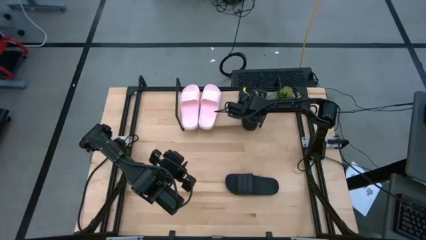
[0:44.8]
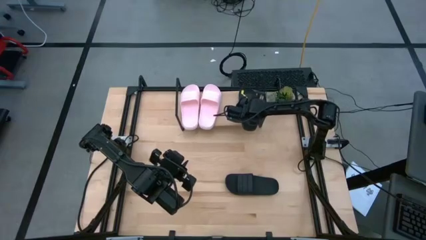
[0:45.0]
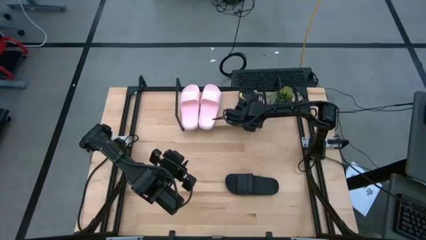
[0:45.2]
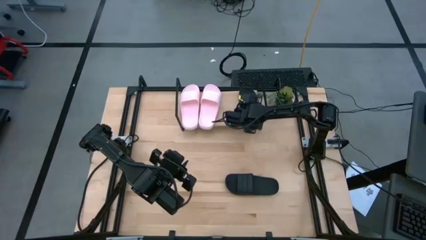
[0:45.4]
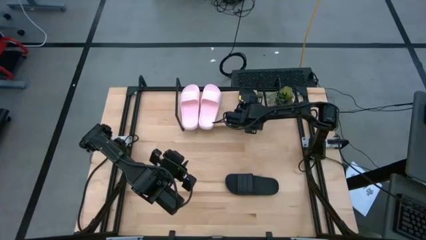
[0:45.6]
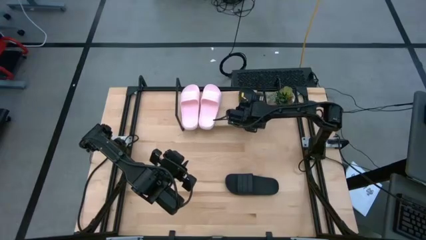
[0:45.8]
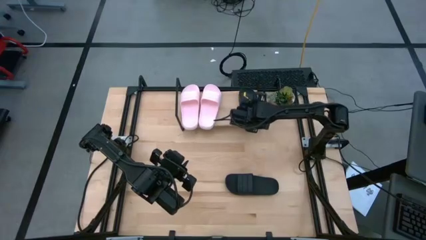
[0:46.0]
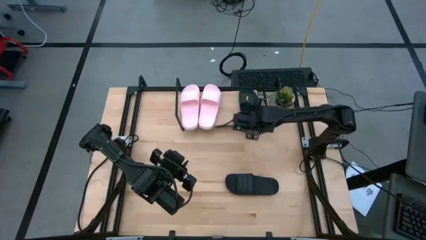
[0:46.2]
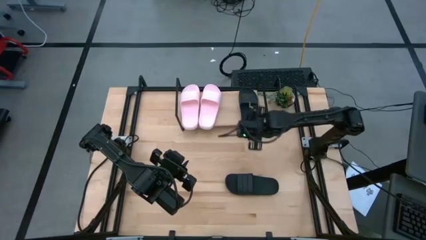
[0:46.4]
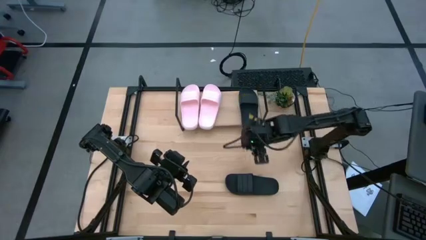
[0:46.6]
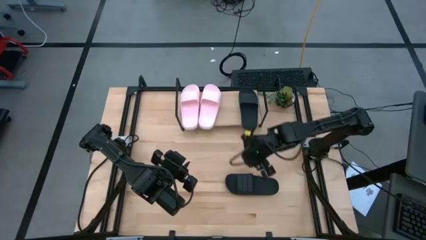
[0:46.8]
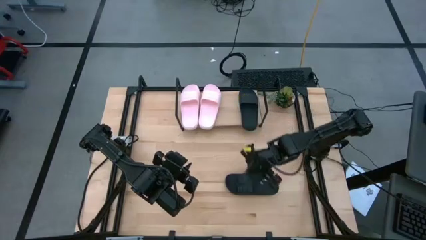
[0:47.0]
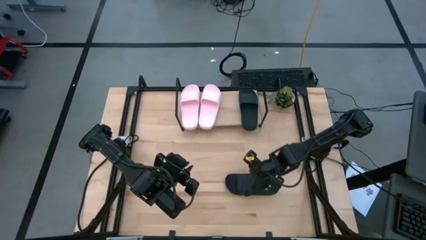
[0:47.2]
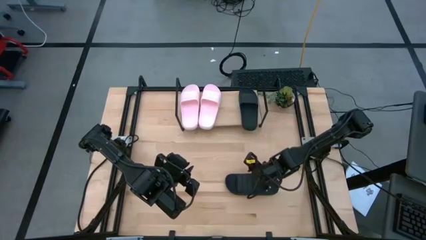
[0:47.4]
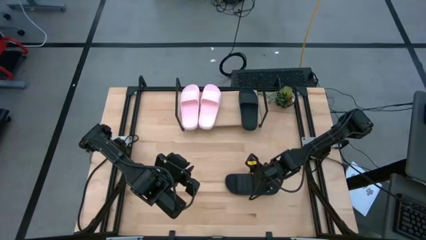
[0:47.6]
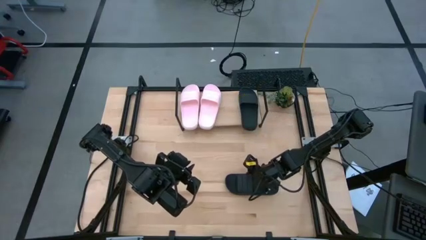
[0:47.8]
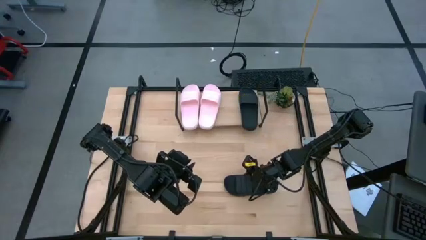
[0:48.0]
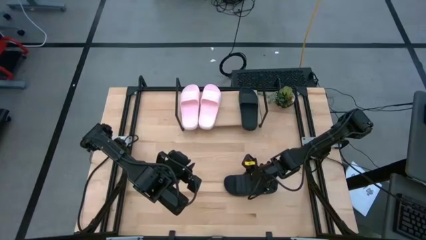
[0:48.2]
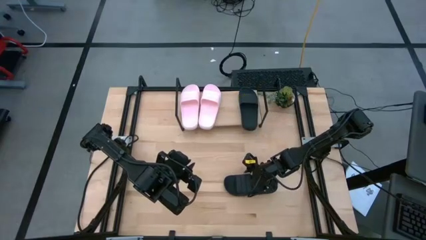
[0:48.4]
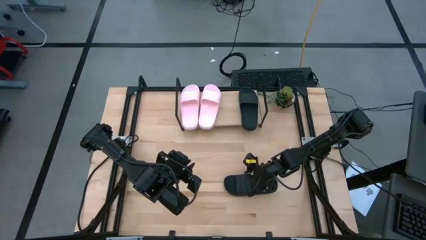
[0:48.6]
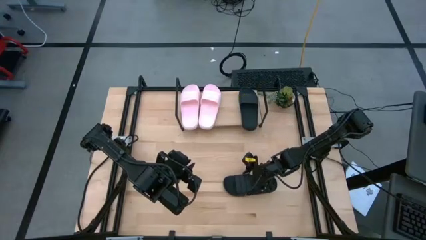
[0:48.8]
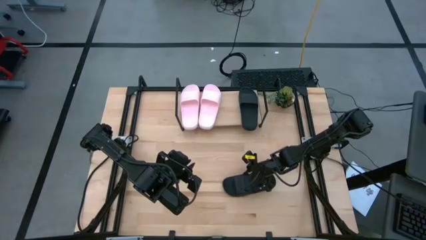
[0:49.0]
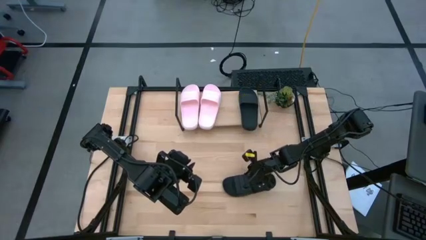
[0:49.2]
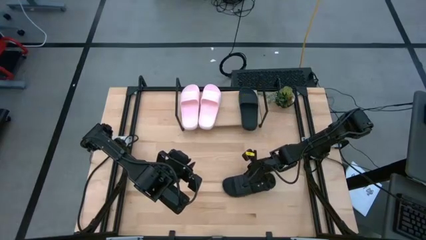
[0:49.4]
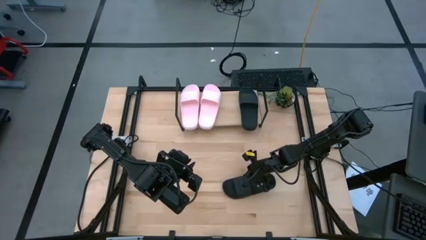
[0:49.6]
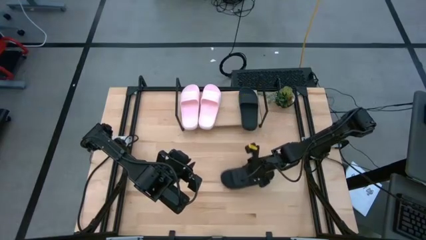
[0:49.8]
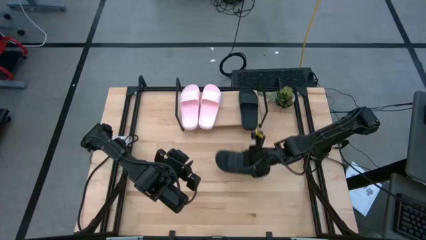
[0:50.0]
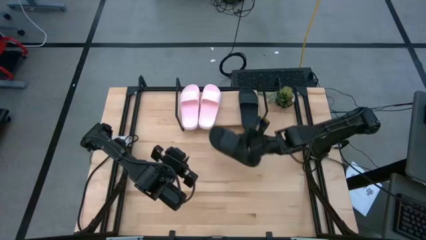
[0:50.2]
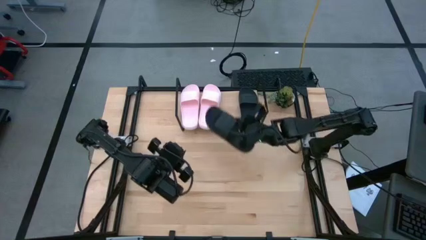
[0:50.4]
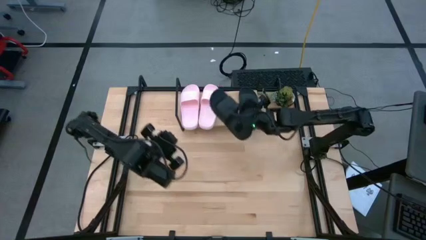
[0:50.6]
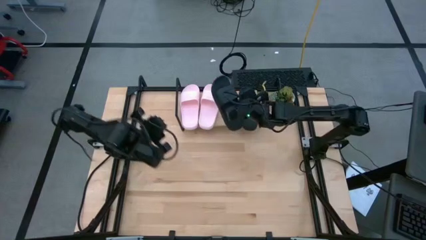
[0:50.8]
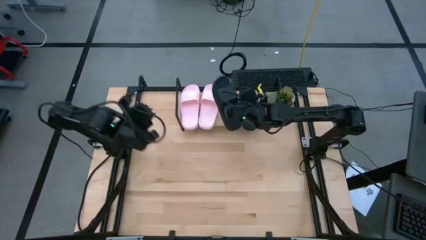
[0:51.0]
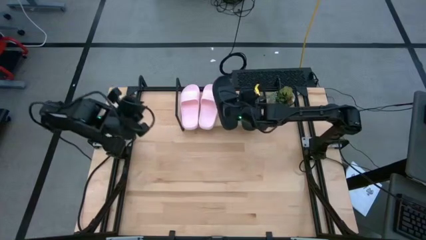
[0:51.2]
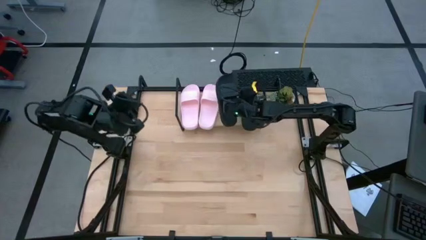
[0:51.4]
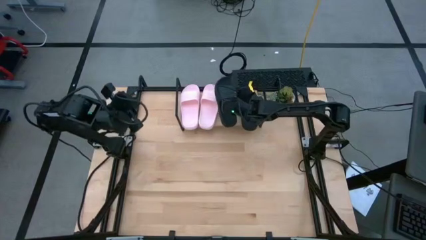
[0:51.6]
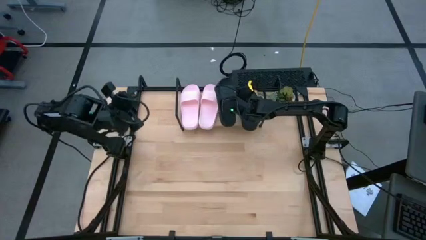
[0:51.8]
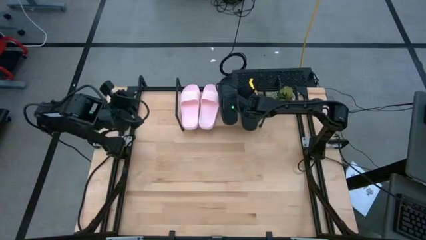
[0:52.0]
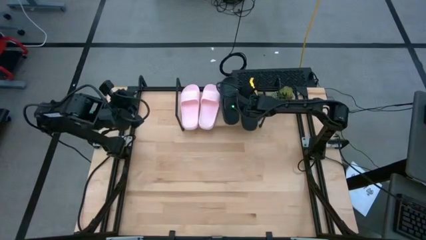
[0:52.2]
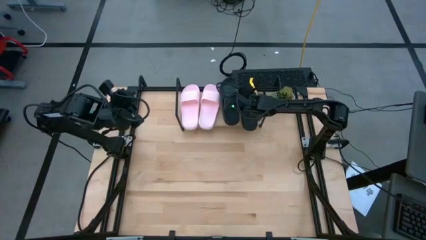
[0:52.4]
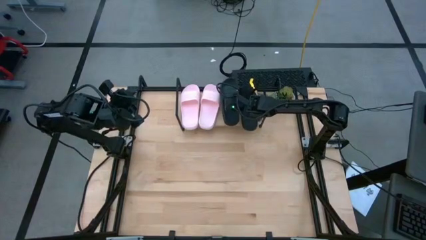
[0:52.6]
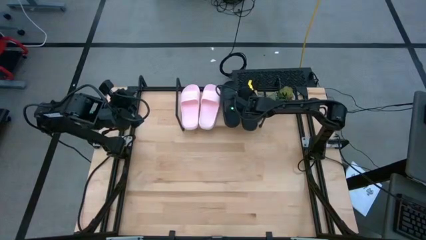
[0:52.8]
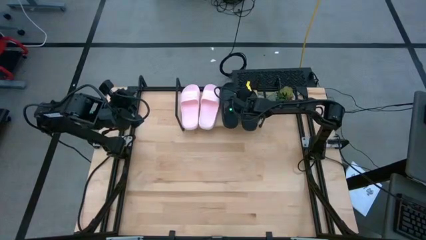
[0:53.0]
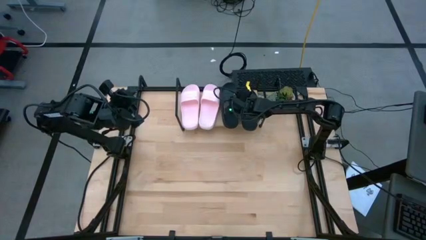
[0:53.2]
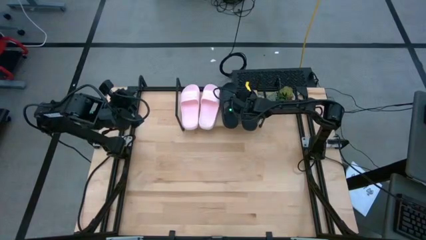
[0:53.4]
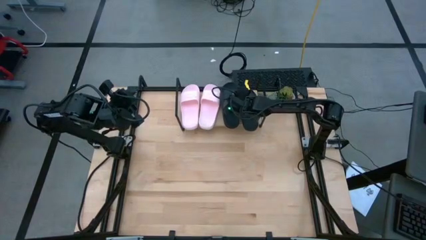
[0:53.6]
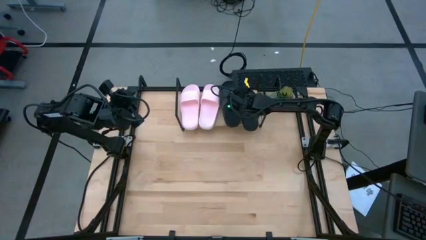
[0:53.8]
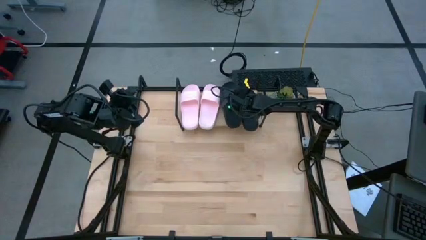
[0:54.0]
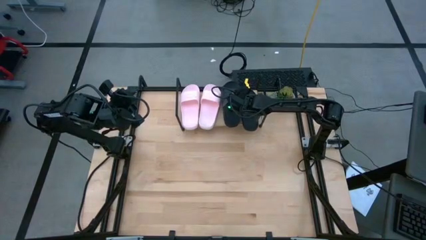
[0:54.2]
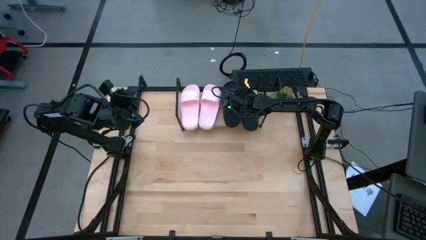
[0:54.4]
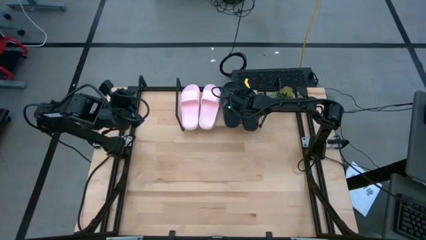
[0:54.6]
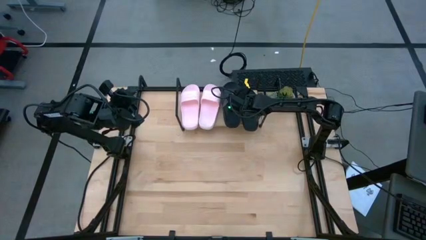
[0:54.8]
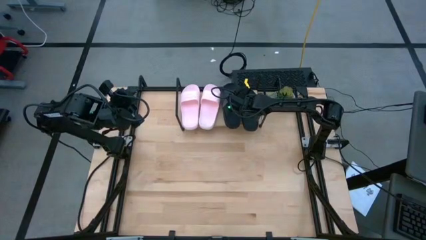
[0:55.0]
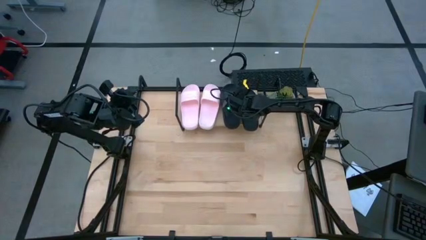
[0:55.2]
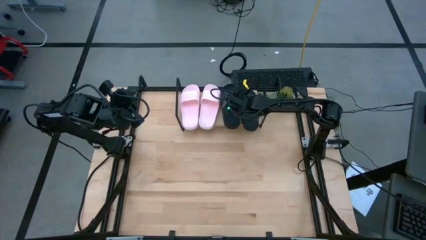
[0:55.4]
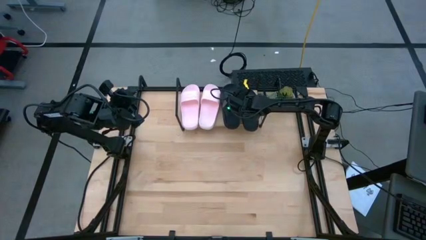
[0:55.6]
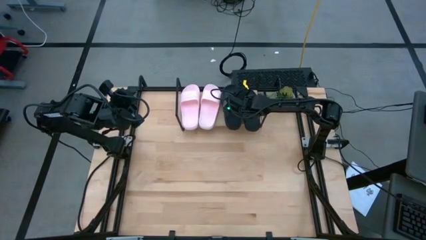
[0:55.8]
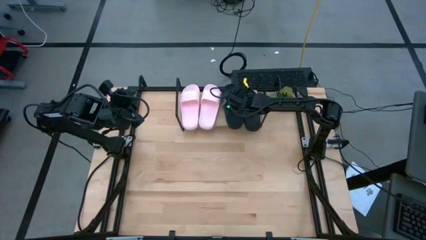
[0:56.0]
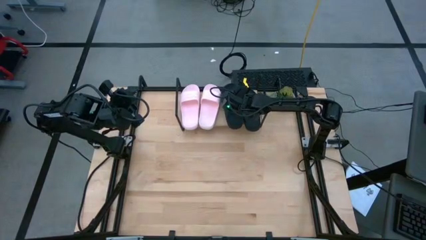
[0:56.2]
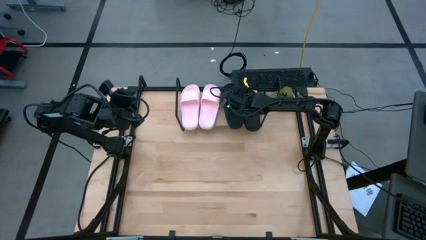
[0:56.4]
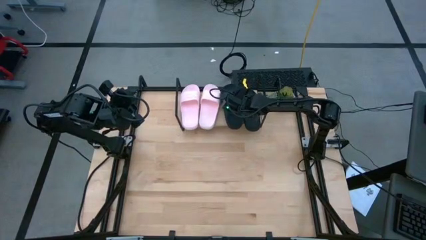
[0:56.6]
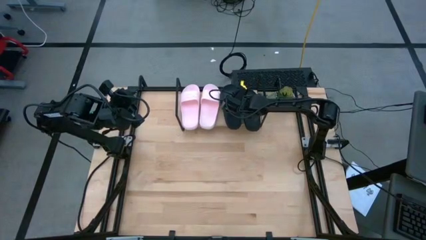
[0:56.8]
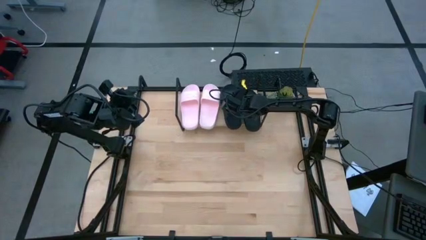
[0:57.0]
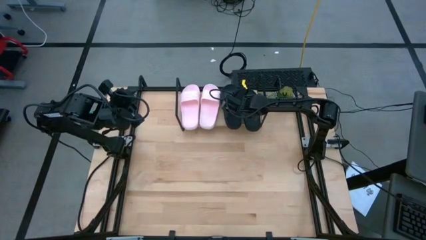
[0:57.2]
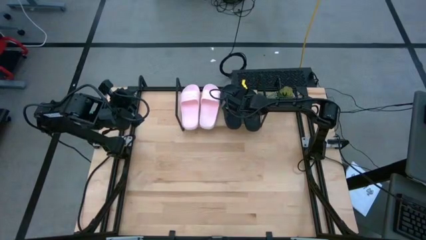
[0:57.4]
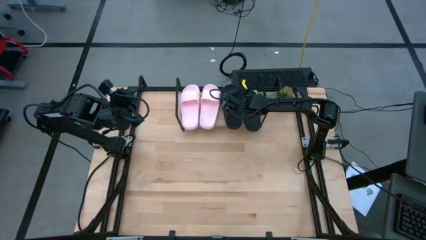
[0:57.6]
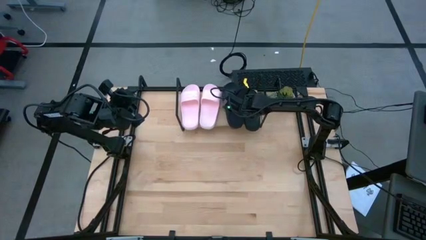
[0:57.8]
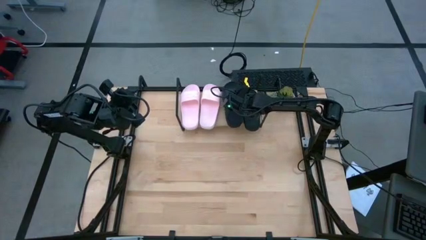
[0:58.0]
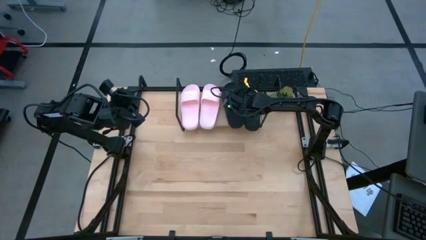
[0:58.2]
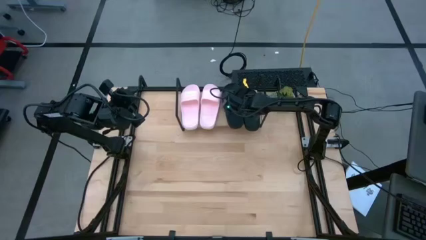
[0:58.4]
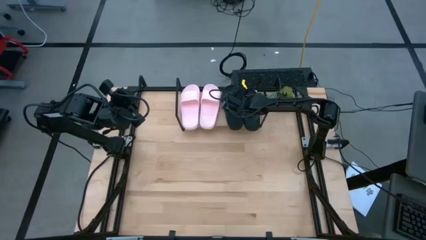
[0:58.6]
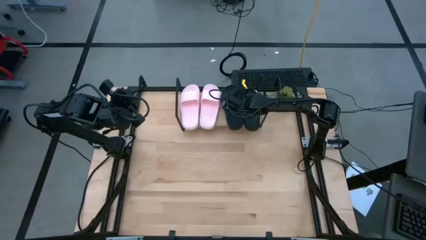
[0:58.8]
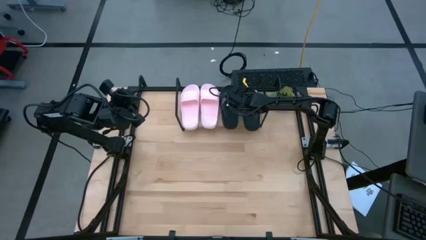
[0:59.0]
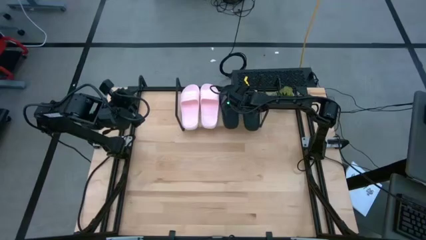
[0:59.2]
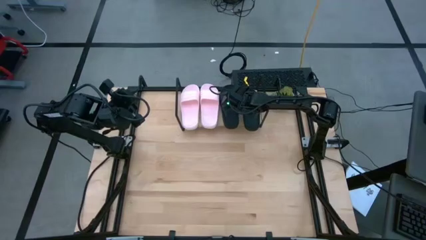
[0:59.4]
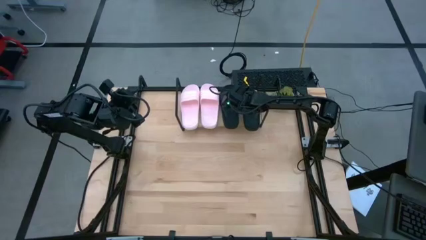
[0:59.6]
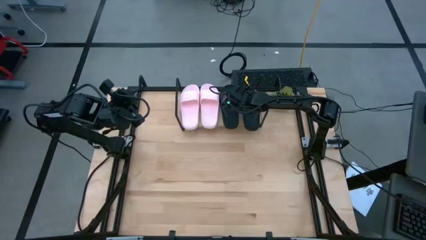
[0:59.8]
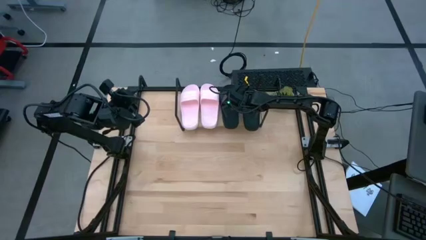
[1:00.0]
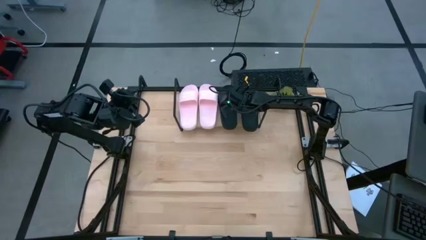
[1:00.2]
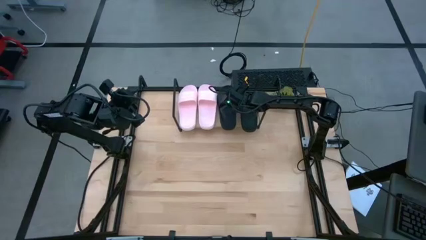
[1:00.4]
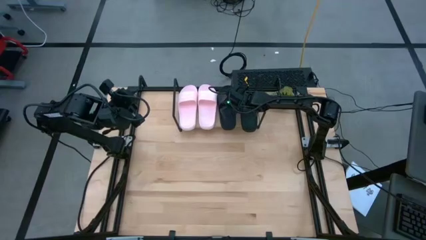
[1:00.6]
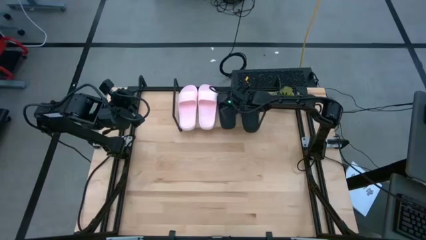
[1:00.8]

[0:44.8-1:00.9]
Task: Pick and place slides into the shelf
Put the black slipper on the shelf
